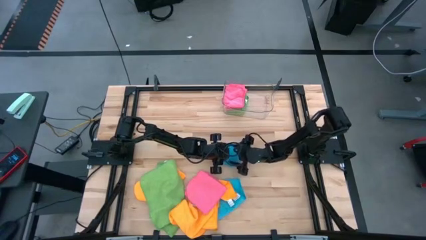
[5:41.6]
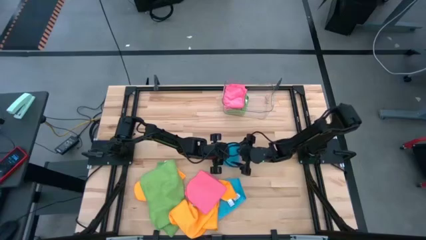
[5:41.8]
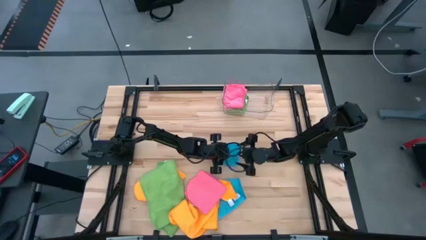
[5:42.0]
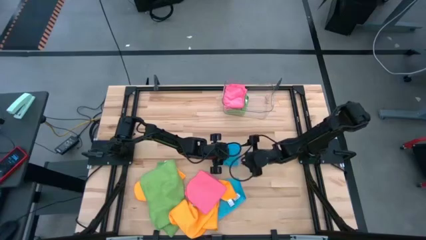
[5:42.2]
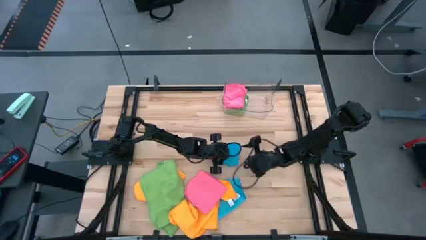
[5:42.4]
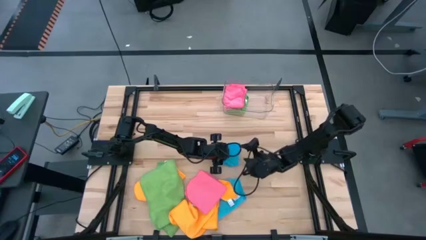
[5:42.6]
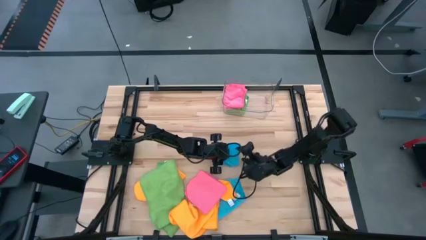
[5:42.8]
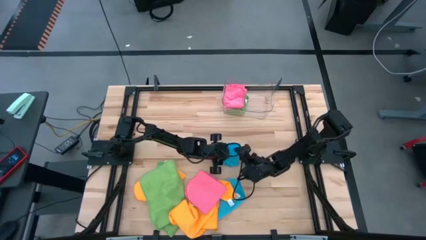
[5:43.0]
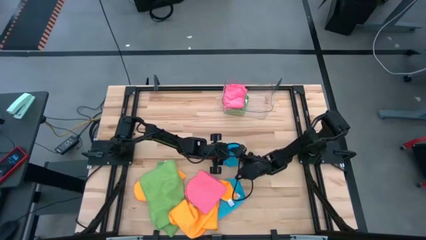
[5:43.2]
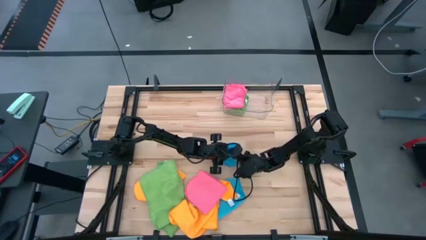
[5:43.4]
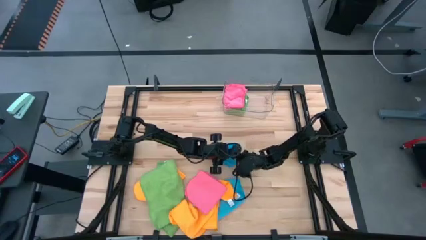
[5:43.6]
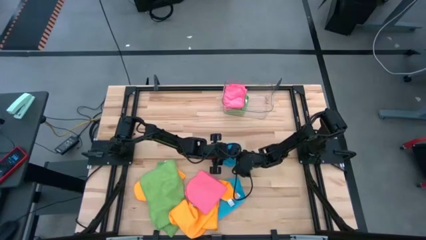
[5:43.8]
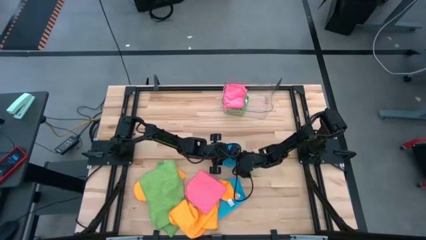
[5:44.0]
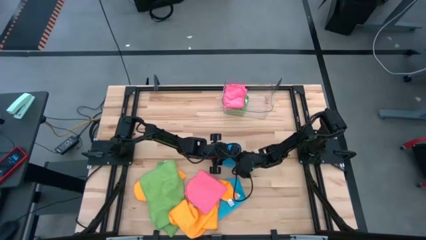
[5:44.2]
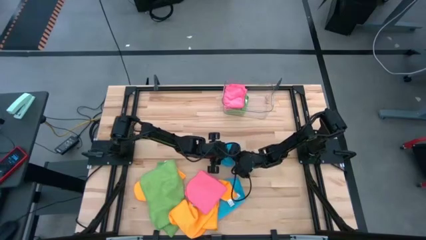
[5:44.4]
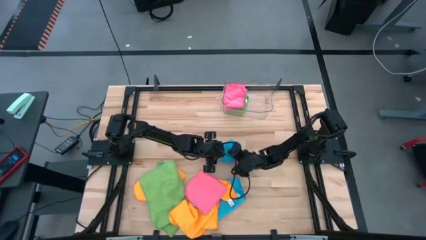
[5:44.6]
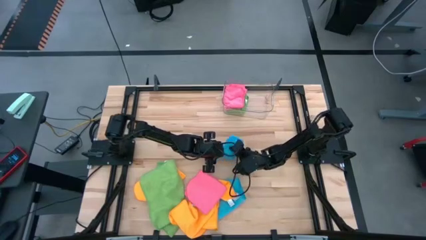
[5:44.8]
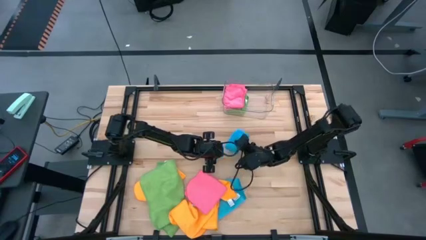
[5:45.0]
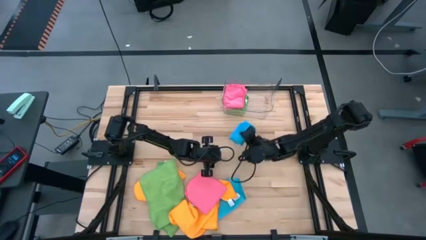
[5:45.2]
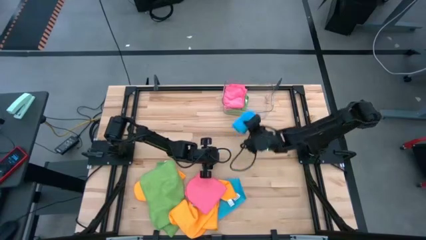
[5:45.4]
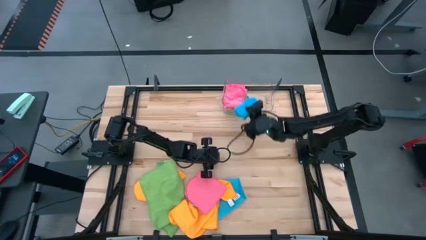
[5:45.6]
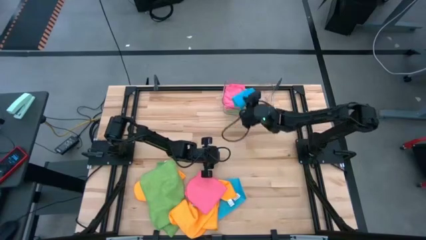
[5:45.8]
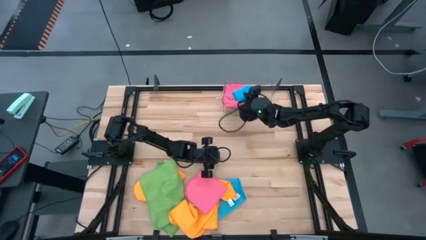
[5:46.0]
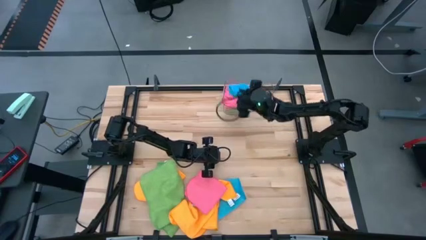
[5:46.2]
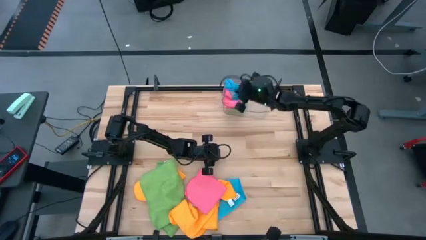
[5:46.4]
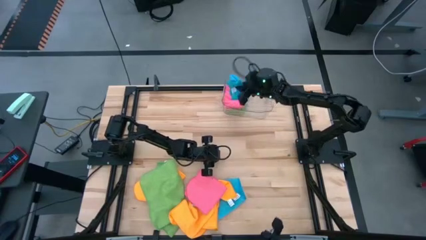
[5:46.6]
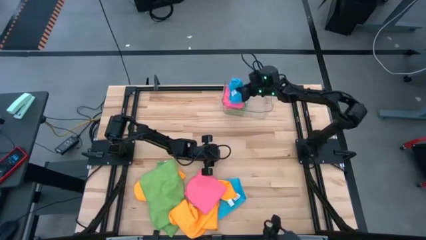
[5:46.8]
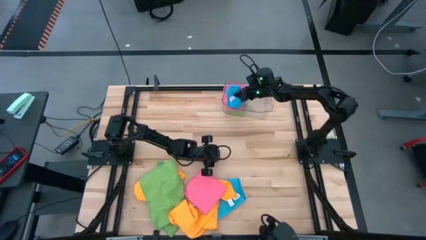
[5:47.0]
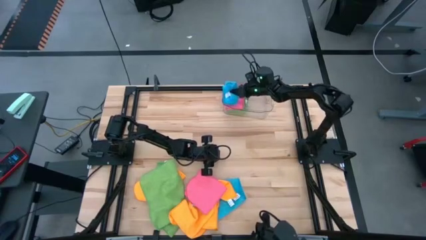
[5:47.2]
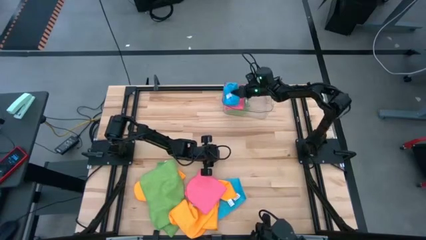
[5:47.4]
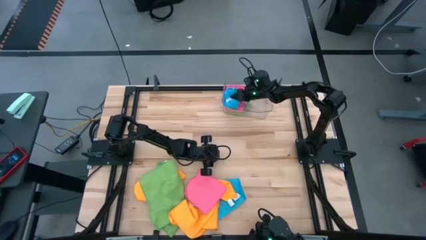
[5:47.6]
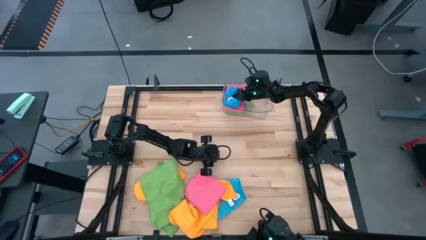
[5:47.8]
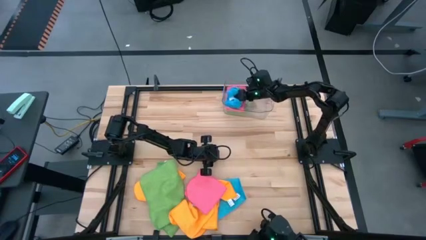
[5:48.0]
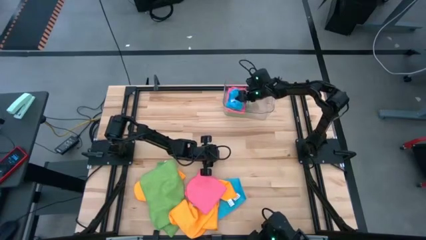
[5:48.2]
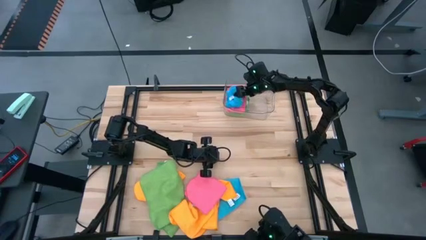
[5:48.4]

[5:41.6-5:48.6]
Task: Fold microfiber towels
Stack the top blue towel on top of the pink towel

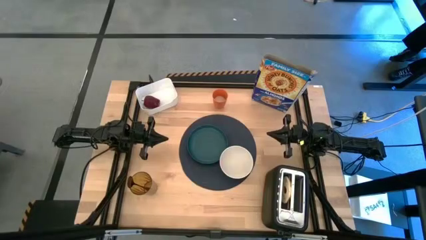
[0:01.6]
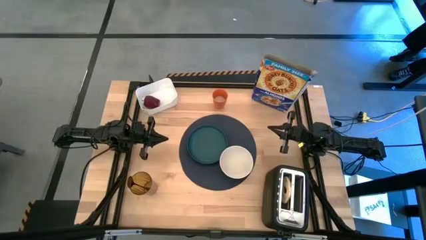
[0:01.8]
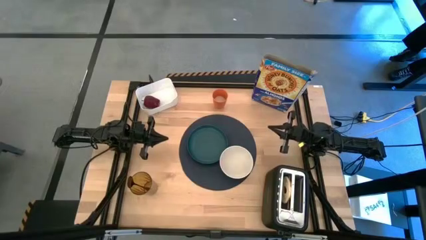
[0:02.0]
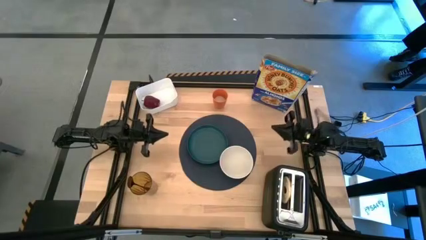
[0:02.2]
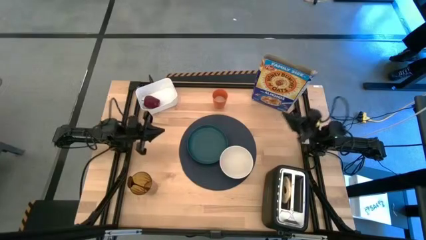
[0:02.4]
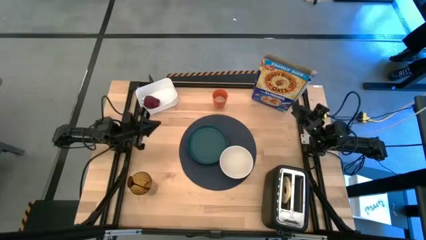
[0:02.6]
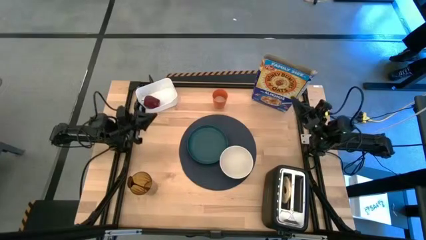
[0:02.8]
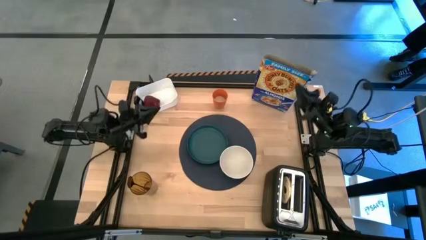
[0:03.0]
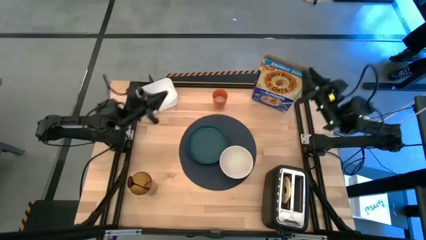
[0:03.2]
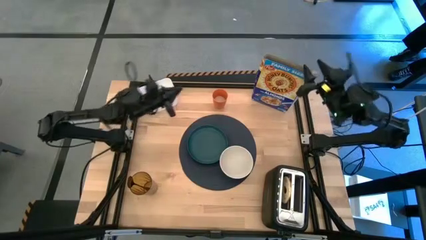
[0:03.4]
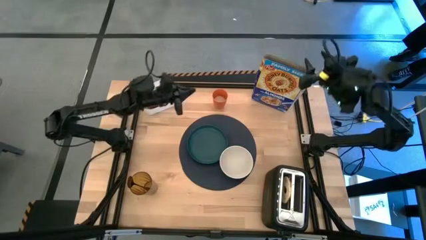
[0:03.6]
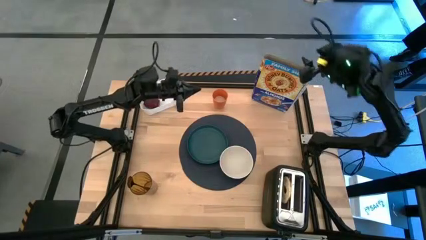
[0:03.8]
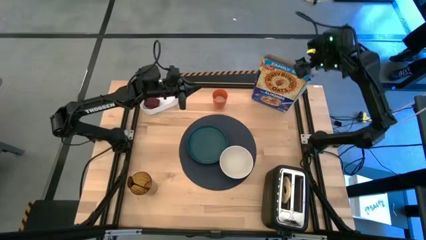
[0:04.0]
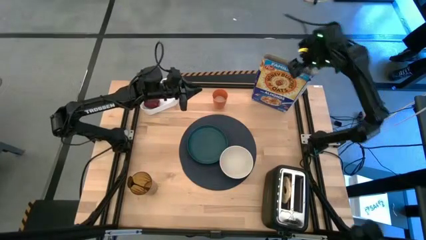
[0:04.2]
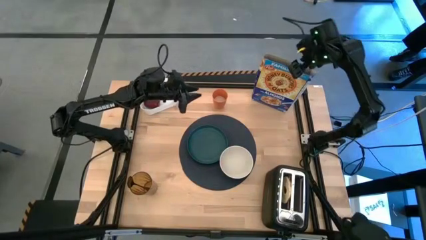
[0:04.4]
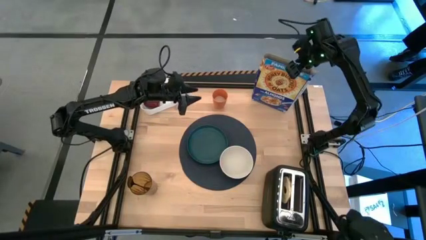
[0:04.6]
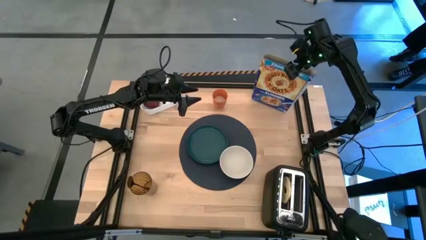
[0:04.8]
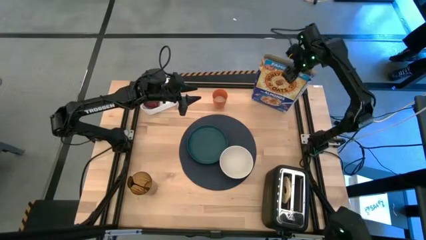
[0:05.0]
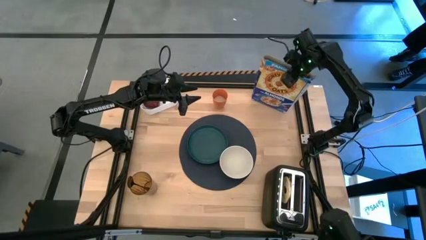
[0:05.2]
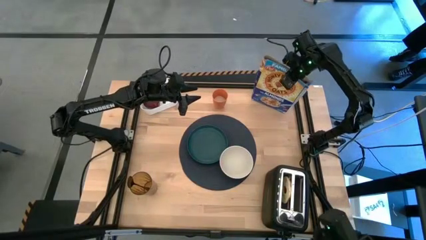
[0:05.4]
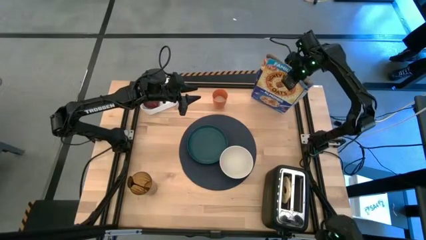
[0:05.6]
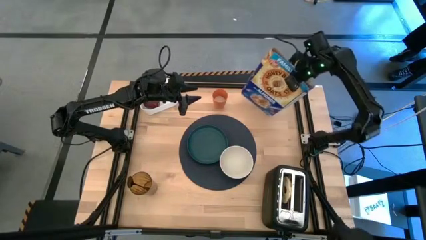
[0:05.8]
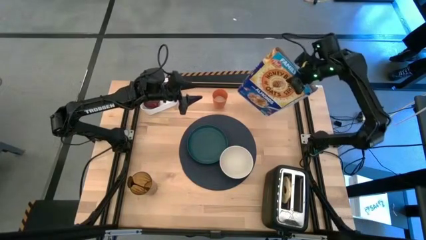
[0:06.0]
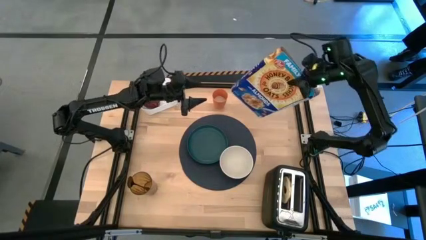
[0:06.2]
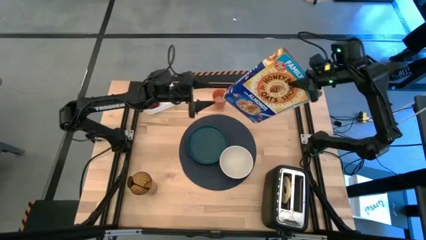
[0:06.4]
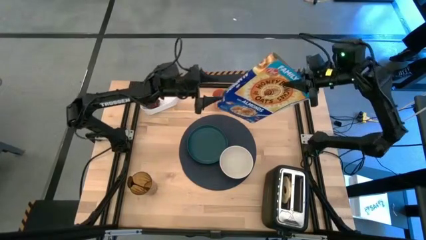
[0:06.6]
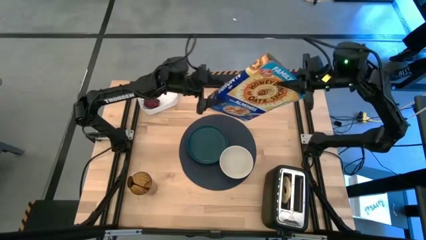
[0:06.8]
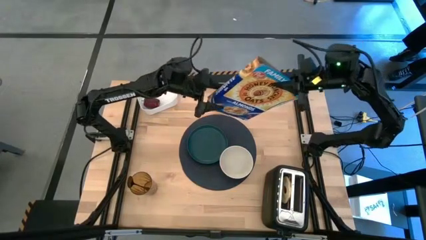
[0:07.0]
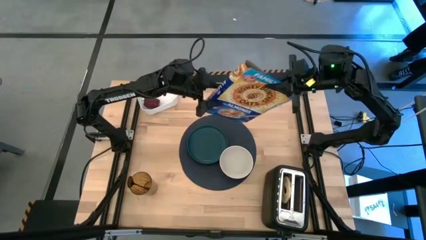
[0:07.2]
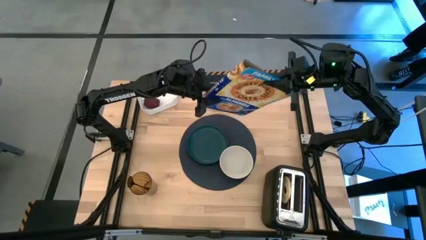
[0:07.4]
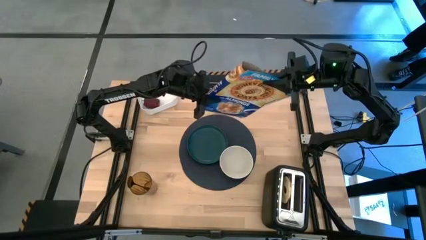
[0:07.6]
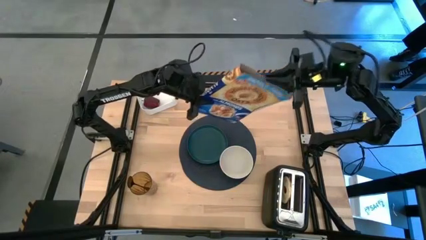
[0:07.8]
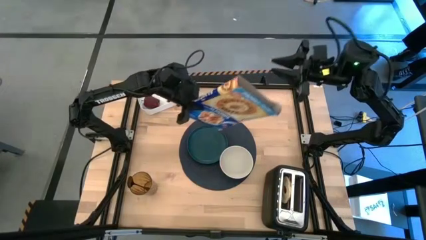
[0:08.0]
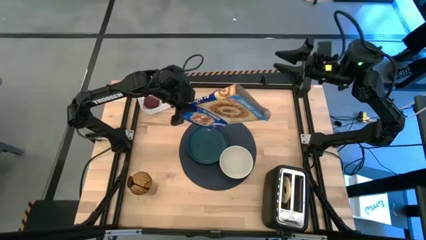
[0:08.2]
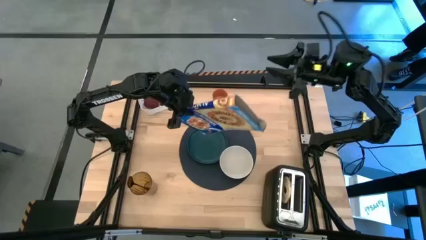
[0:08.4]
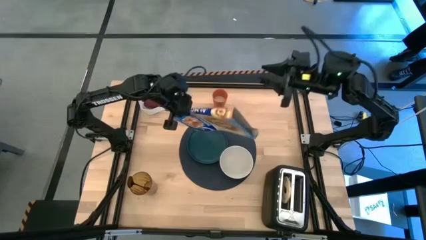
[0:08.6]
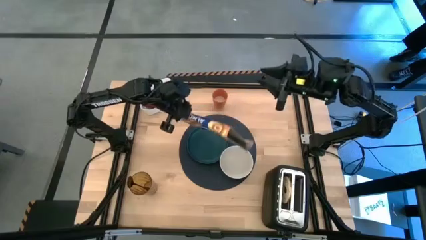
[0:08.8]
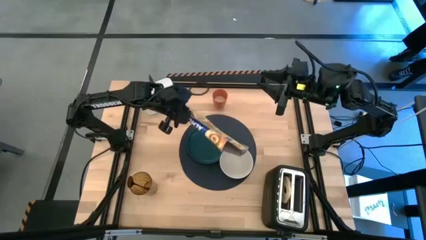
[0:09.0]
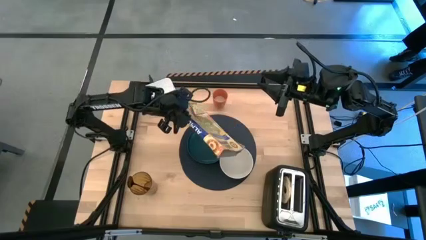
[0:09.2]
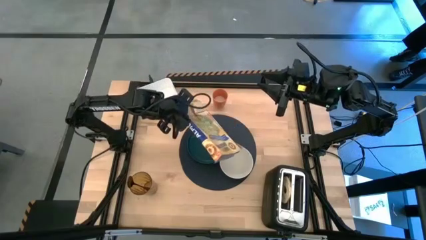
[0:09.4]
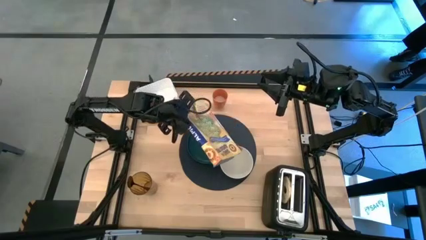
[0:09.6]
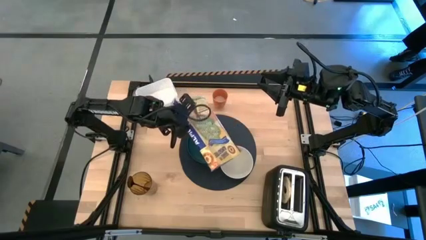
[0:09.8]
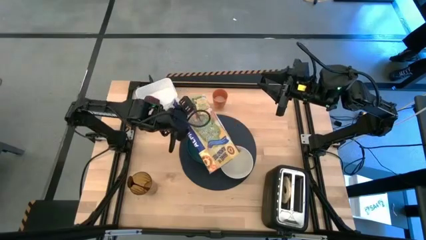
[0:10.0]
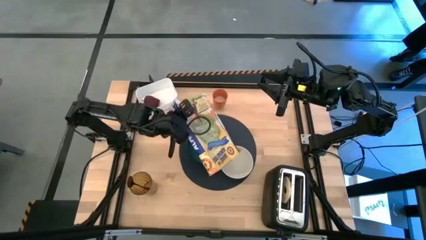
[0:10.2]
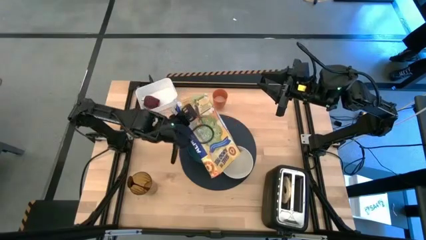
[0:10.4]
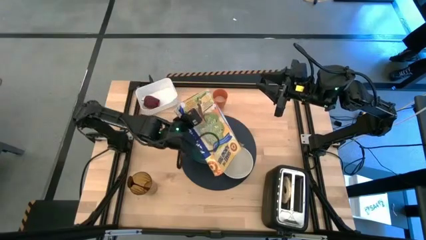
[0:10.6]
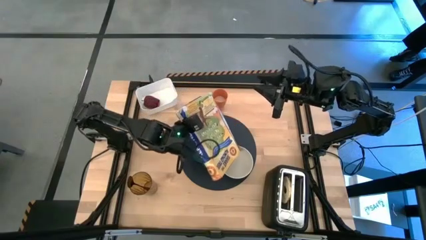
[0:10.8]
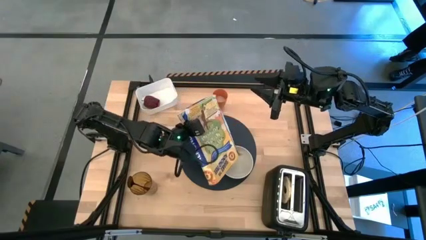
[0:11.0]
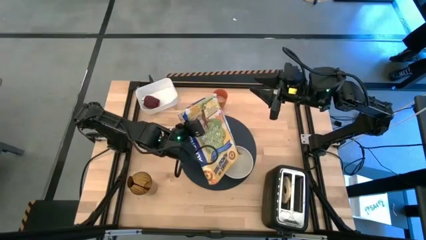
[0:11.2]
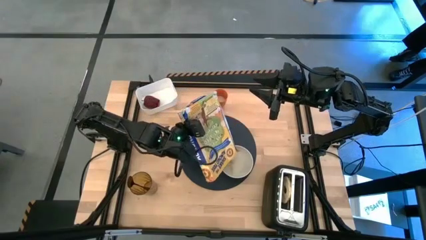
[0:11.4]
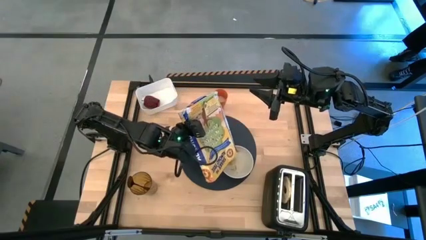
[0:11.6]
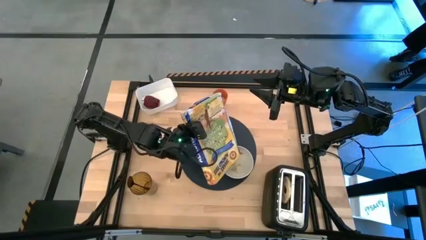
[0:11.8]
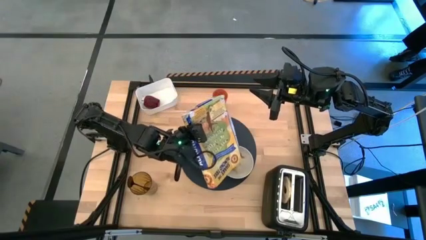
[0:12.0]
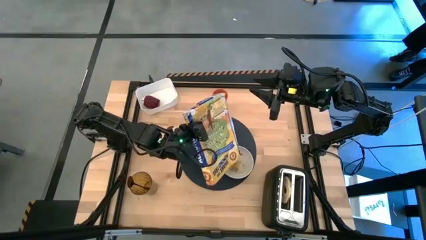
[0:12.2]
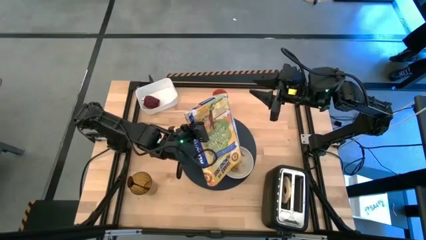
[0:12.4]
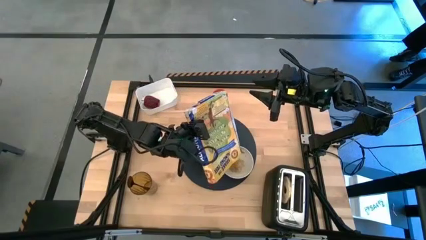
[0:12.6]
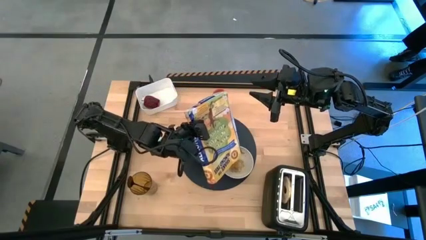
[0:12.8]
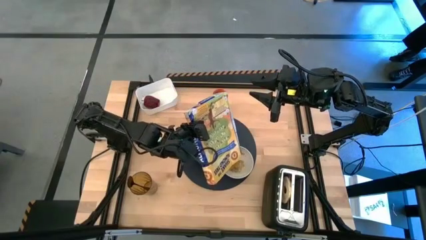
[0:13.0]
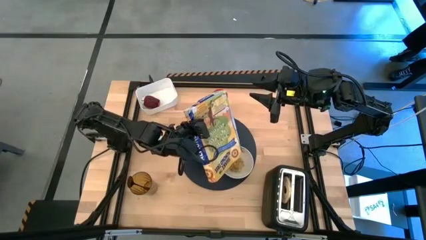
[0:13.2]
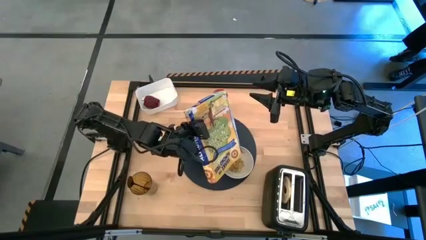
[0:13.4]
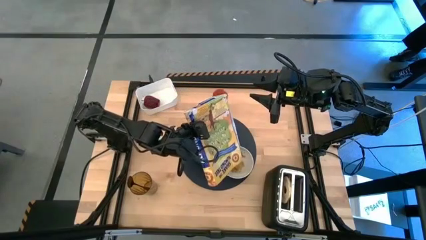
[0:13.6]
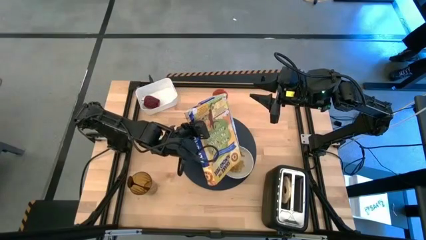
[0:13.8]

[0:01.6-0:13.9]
Task: Arrange a breakfast setting
Pour the cereal from the cereal box into the white bowl
